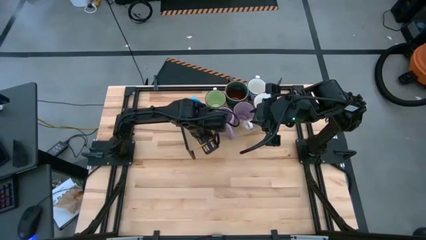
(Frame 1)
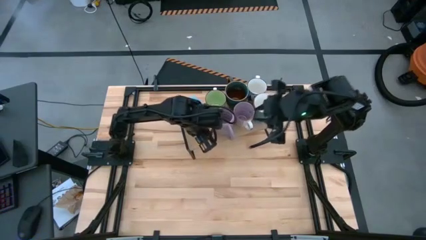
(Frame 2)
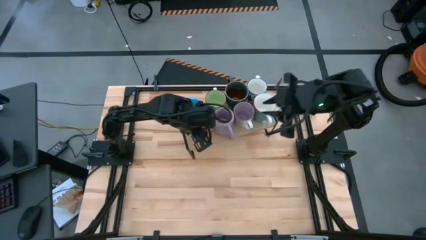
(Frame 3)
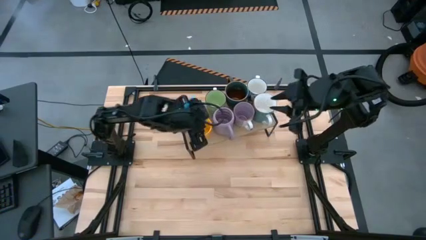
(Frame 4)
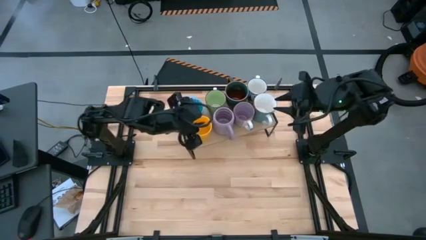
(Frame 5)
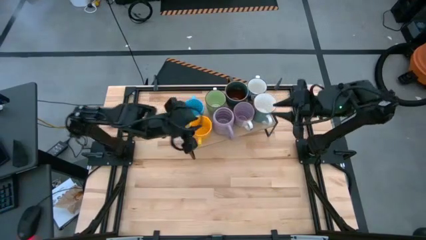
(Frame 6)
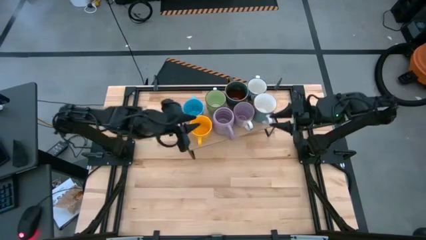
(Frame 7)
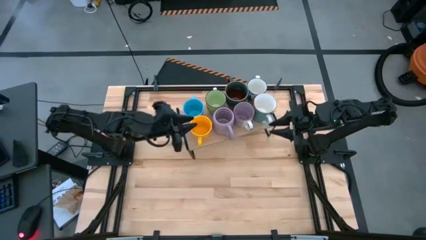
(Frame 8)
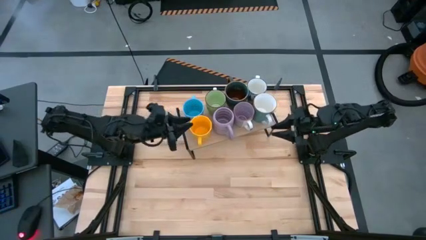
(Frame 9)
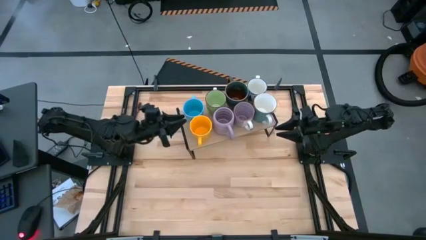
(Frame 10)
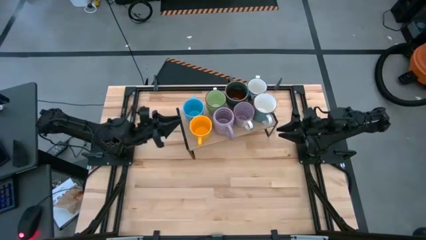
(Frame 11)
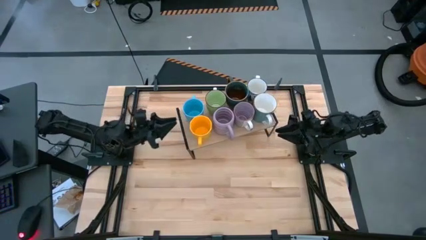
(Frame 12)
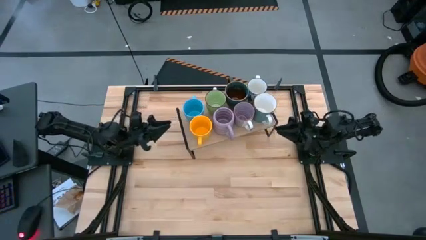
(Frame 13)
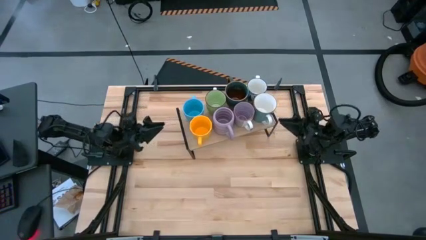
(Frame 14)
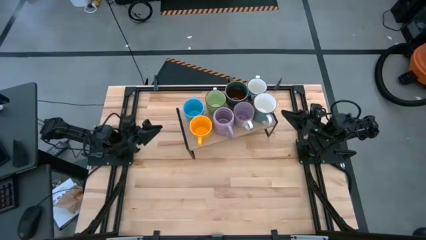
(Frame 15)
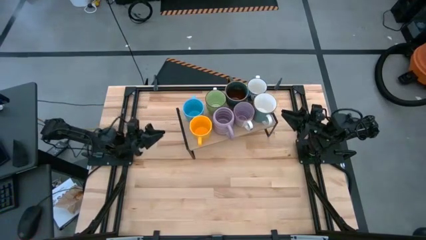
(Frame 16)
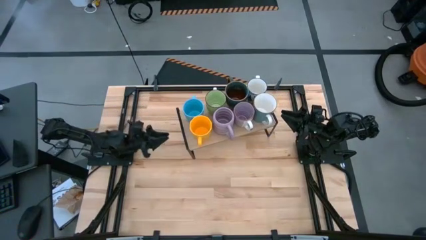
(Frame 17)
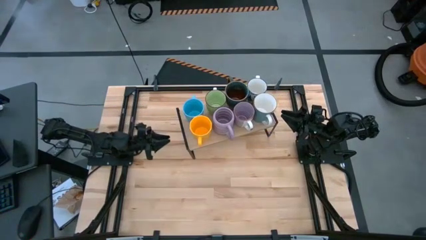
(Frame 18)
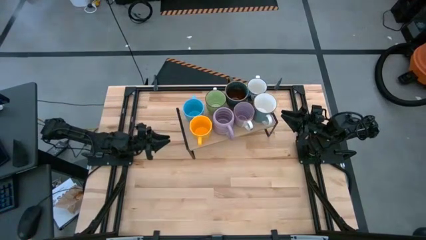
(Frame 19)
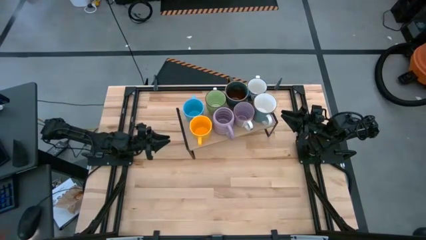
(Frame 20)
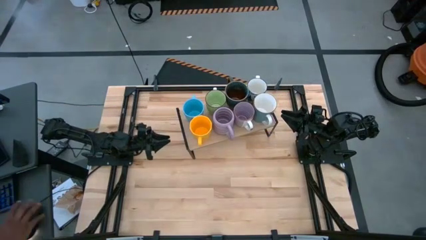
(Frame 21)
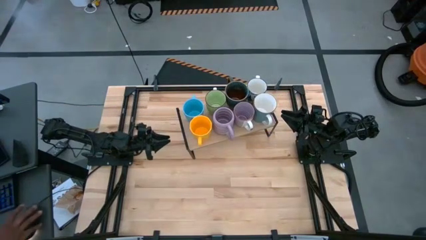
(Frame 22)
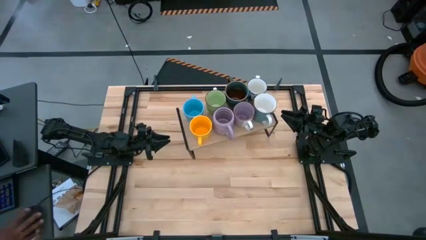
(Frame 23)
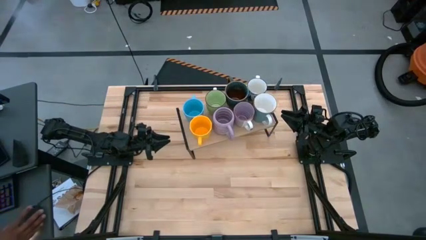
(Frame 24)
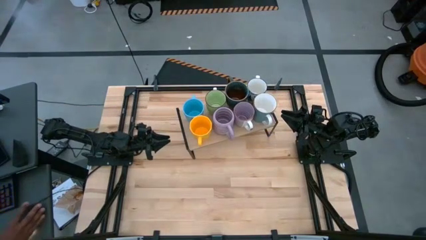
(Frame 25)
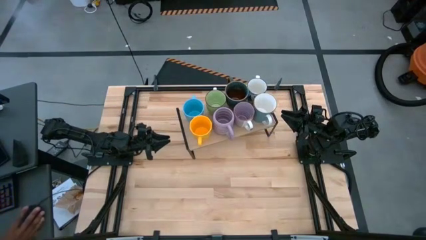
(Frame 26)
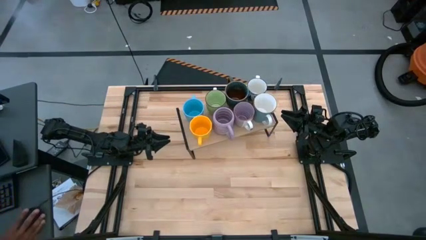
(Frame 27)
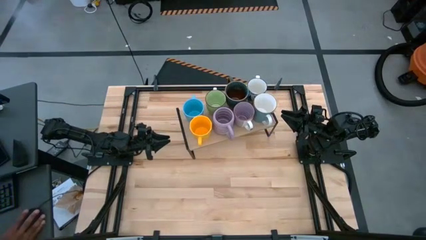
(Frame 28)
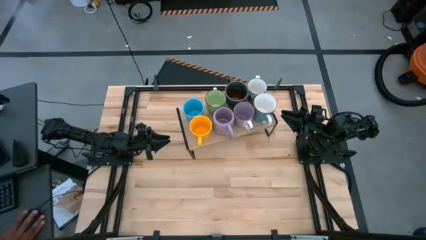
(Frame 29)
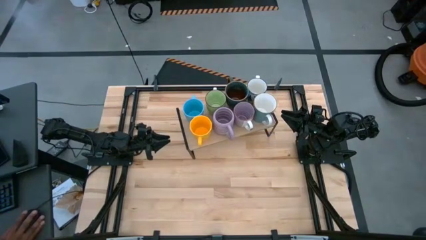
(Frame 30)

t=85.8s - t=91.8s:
Task: Place coffee mugs
Return to Home Position

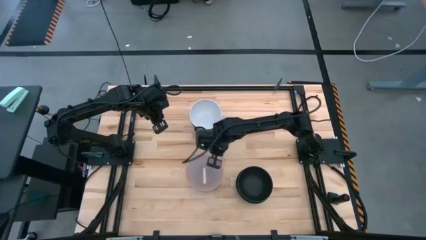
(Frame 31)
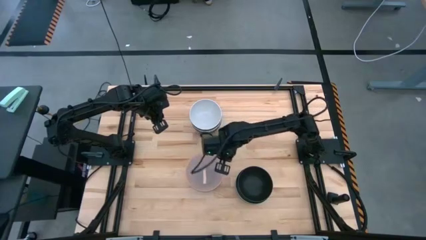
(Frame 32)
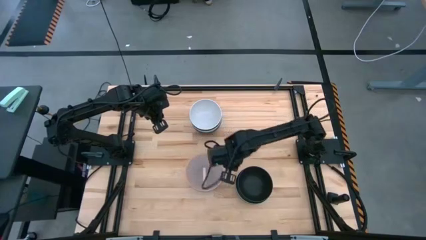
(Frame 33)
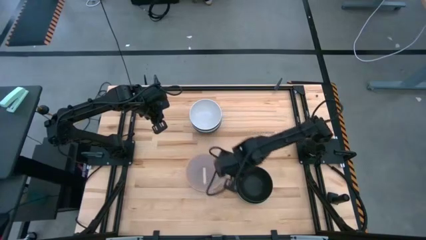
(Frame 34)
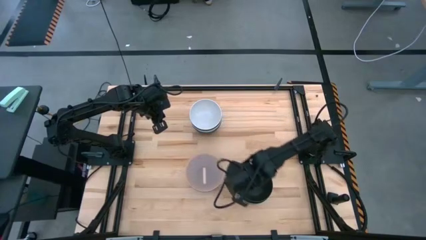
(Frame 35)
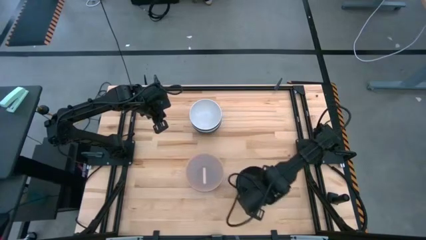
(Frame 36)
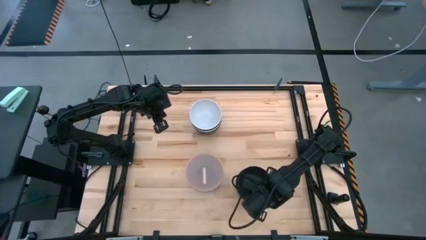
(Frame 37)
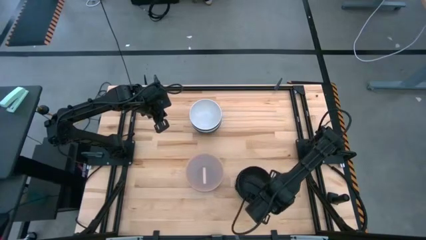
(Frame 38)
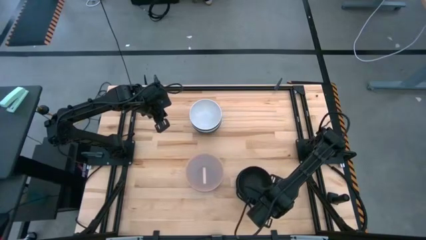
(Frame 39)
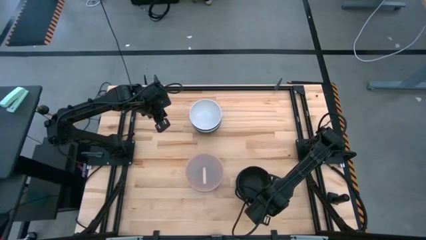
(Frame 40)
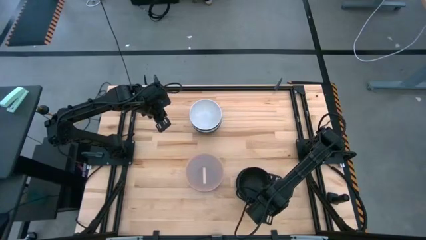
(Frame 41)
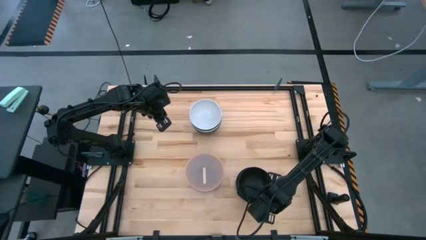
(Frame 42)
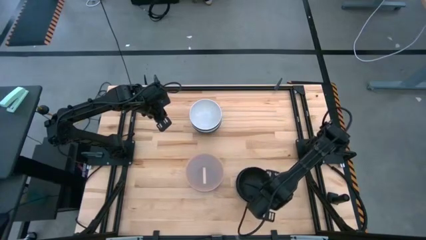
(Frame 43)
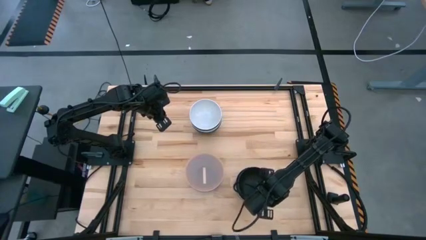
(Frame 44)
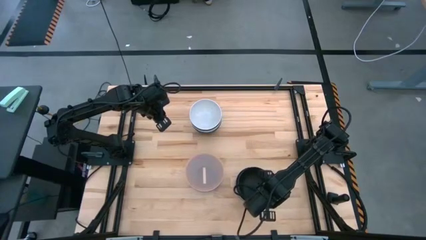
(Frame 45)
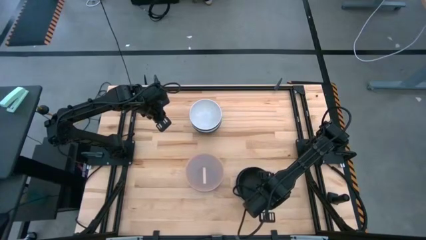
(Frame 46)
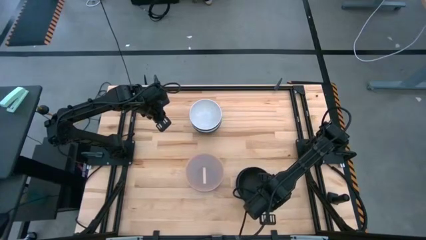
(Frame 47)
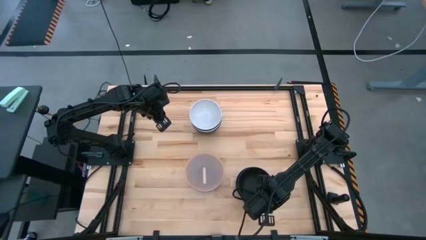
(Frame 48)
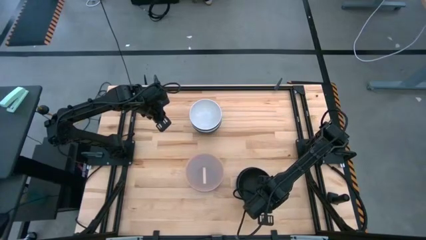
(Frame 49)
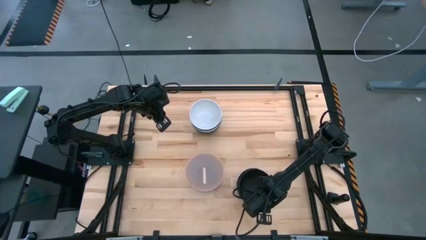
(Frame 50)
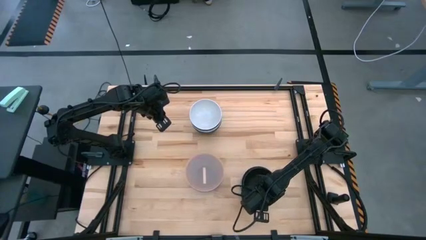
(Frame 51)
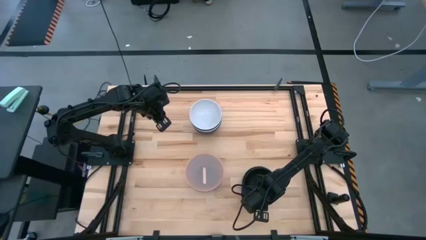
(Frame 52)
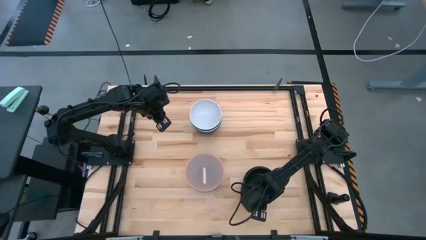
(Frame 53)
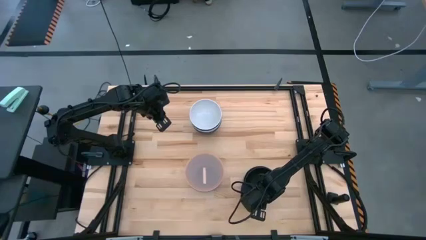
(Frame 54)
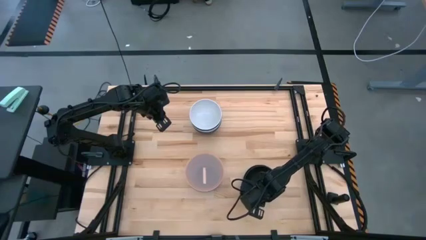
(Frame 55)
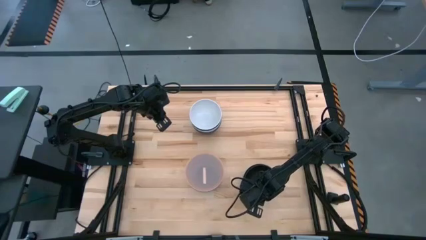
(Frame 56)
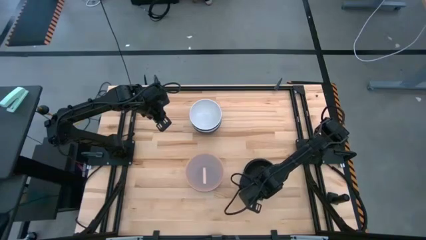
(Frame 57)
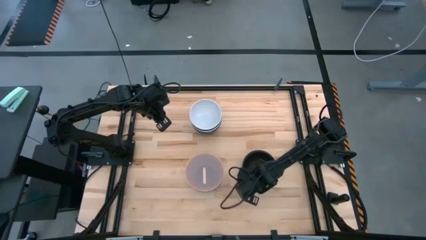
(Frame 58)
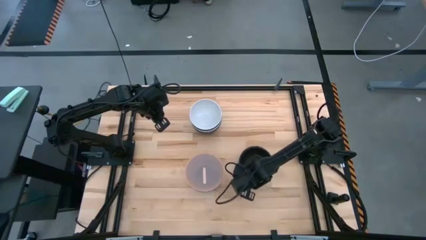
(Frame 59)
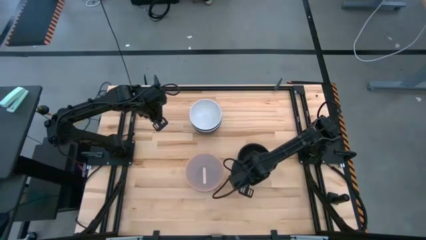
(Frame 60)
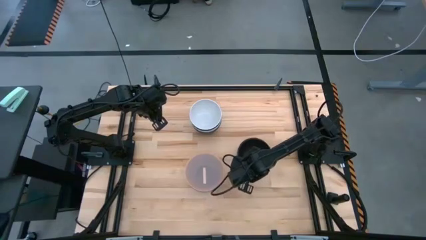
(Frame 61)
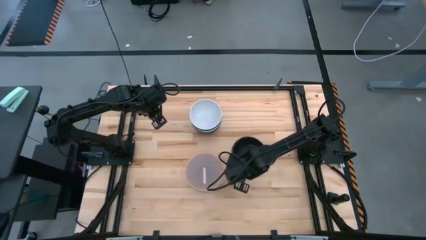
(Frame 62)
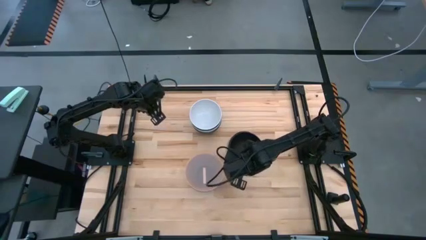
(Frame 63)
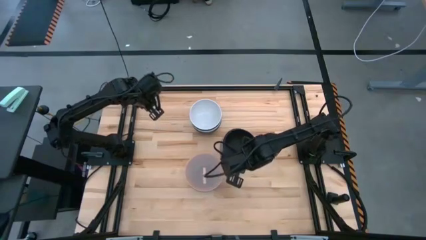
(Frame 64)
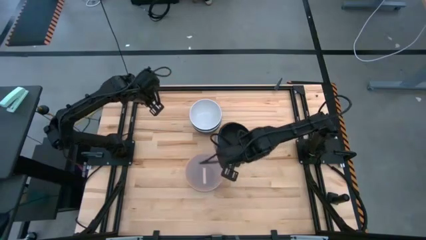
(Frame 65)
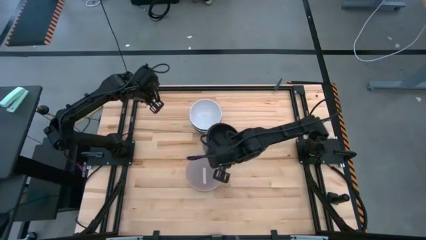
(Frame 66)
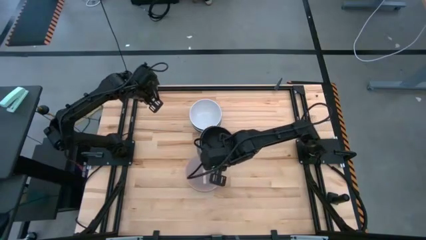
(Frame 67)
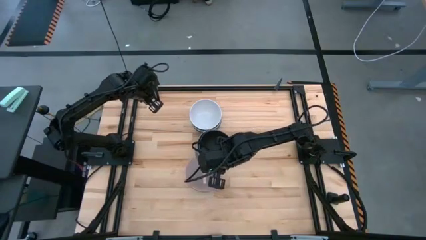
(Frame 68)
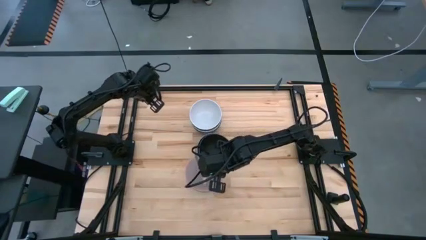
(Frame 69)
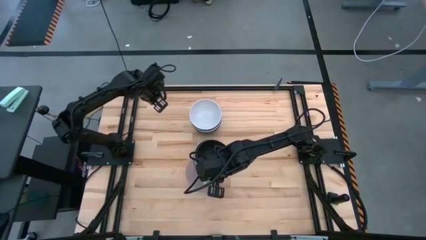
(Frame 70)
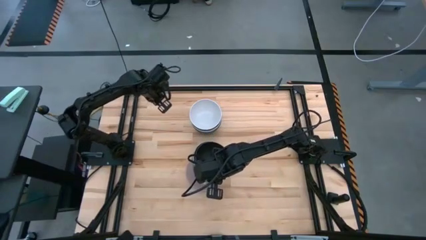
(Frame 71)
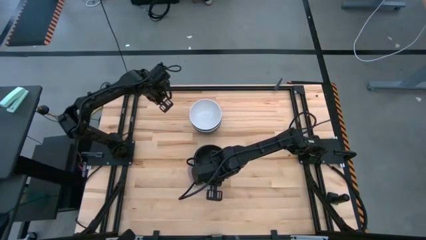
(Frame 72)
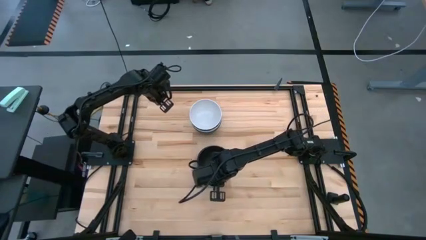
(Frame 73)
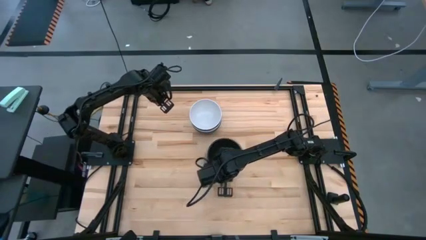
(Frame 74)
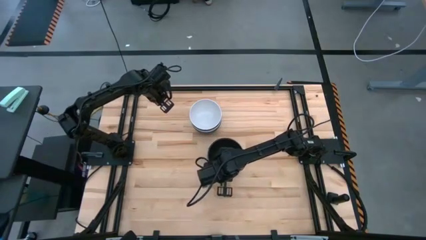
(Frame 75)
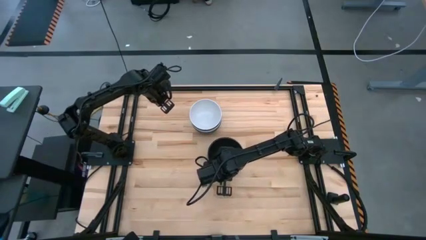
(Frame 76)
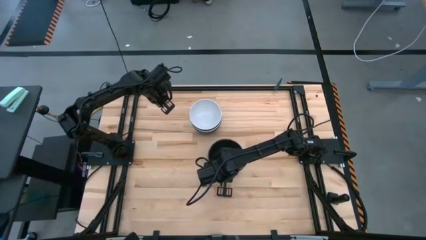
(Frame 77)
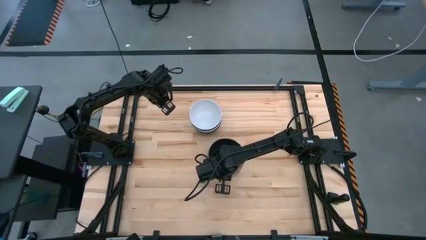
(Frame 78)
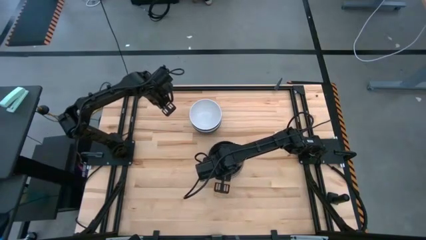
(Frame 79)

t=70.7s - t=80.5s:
Task: Nest bowls inside each other
Stack the bottom right stacked bowls on top of the bottom left stacked bowls
